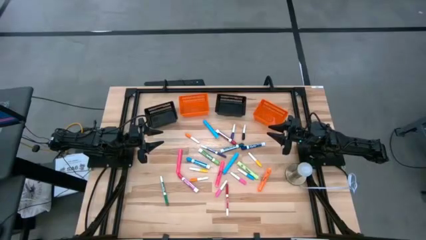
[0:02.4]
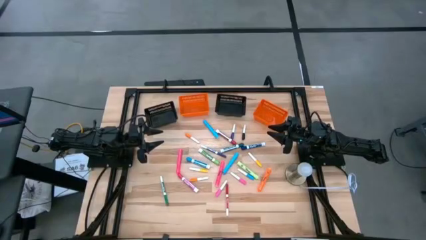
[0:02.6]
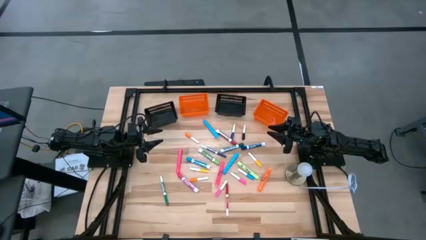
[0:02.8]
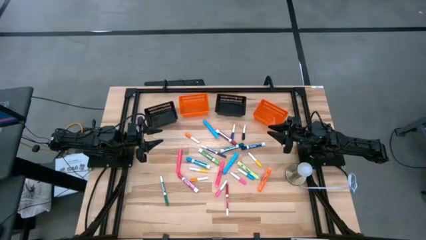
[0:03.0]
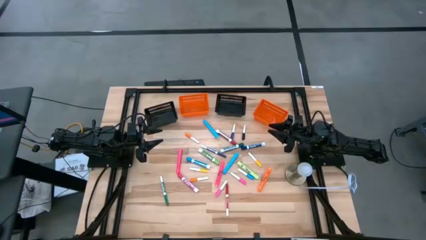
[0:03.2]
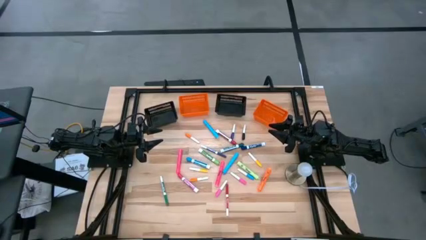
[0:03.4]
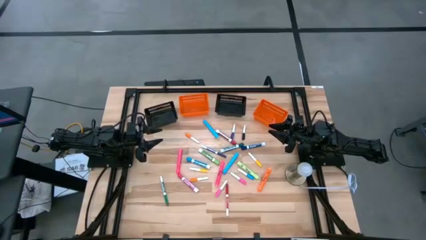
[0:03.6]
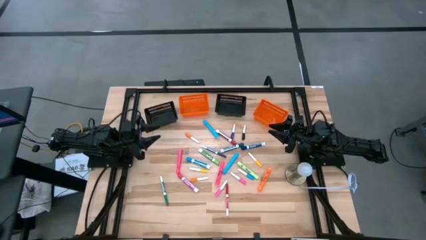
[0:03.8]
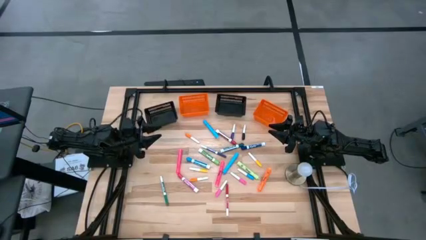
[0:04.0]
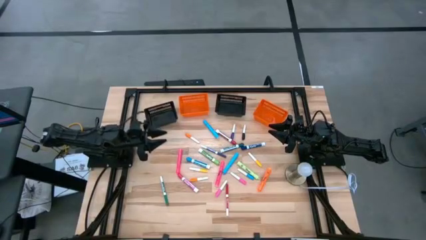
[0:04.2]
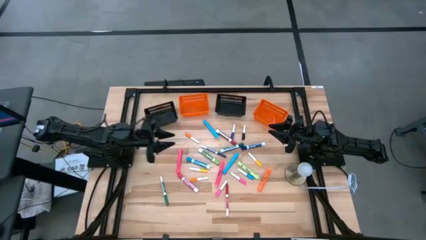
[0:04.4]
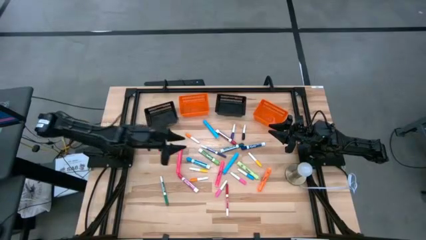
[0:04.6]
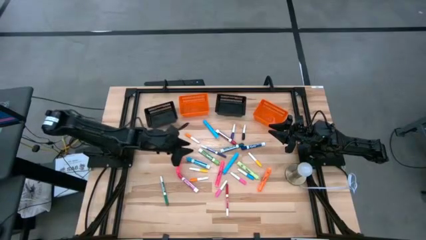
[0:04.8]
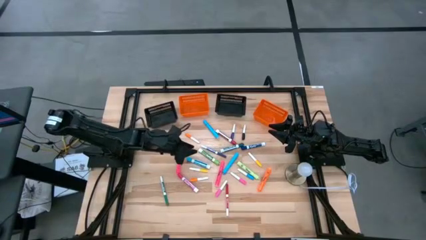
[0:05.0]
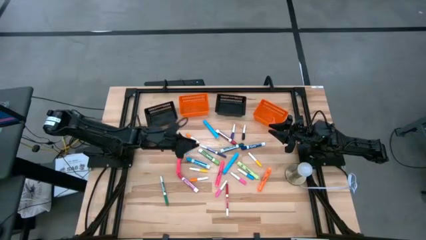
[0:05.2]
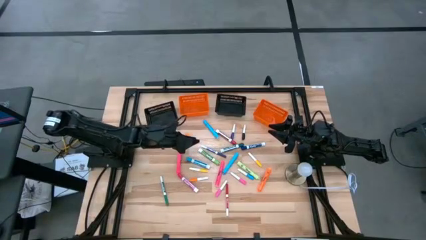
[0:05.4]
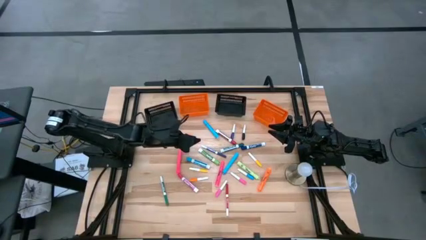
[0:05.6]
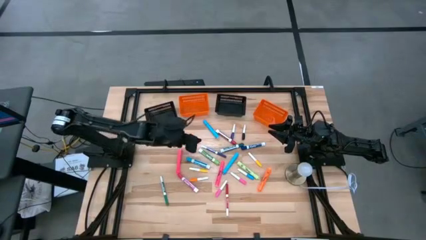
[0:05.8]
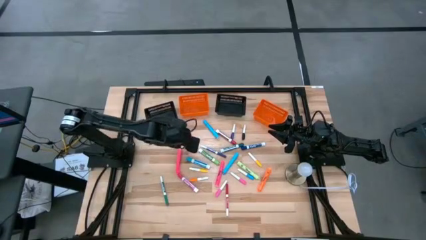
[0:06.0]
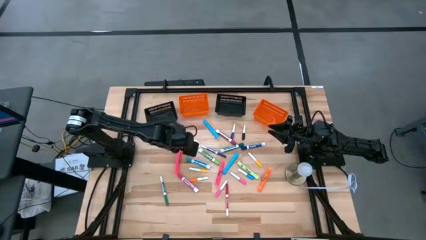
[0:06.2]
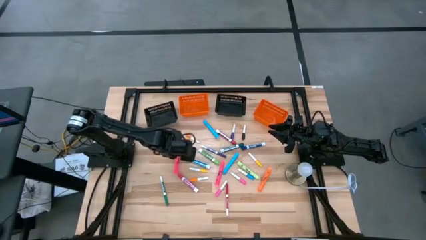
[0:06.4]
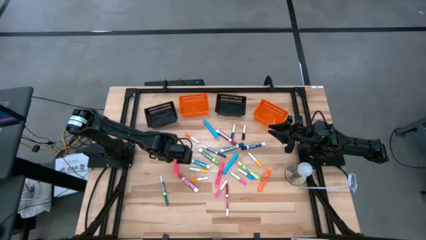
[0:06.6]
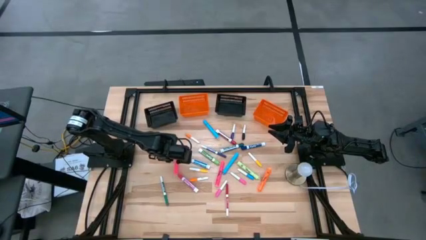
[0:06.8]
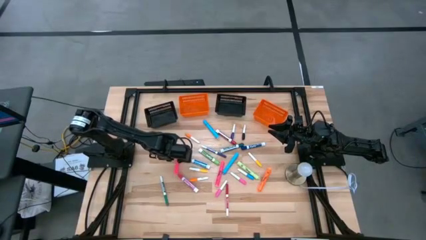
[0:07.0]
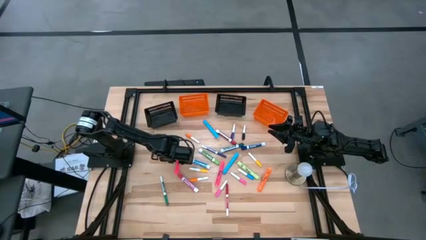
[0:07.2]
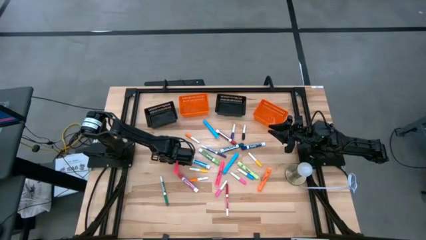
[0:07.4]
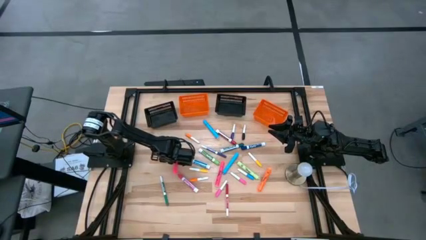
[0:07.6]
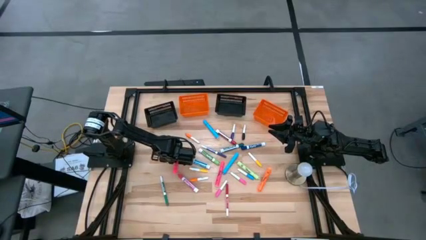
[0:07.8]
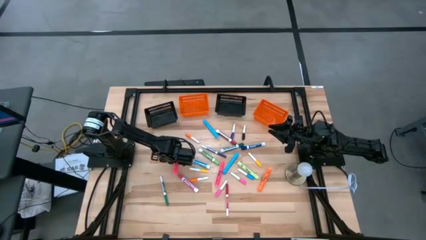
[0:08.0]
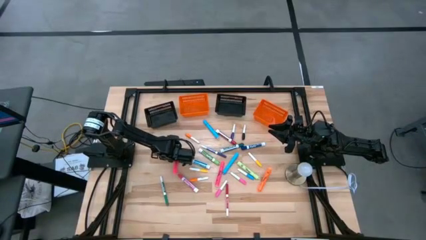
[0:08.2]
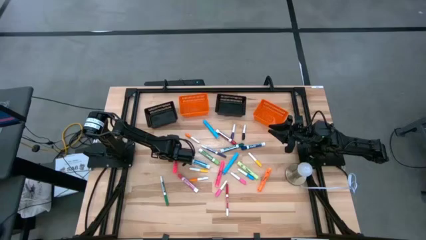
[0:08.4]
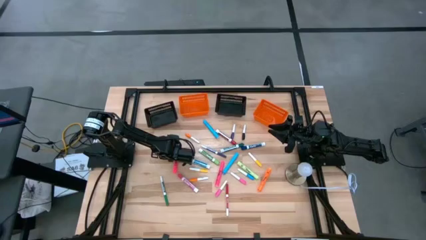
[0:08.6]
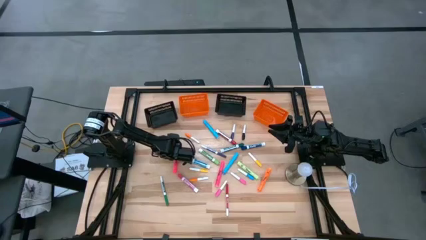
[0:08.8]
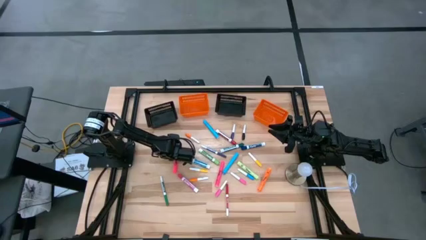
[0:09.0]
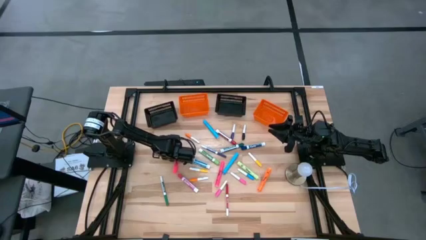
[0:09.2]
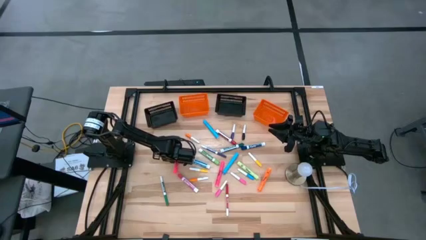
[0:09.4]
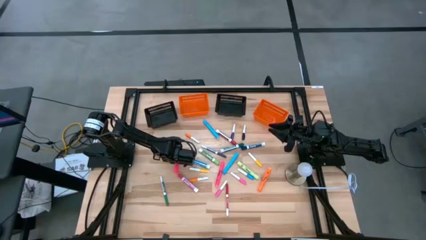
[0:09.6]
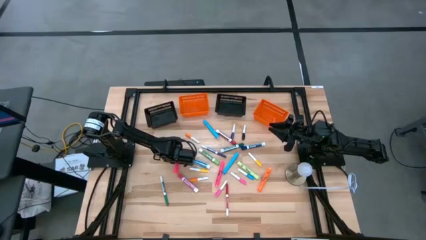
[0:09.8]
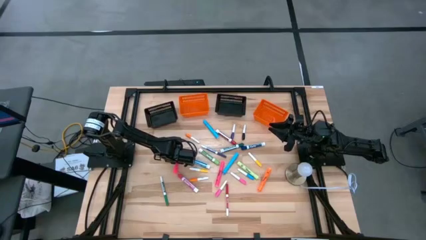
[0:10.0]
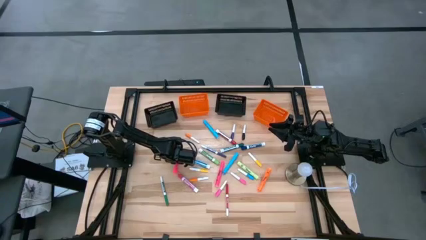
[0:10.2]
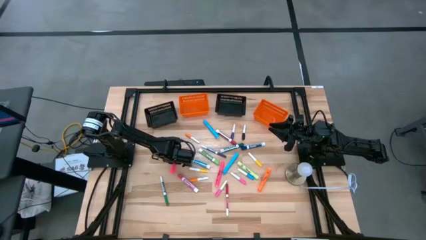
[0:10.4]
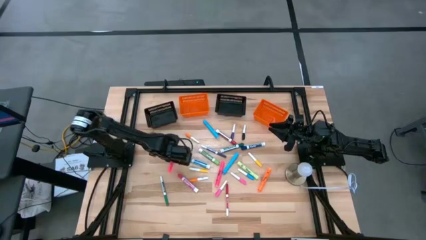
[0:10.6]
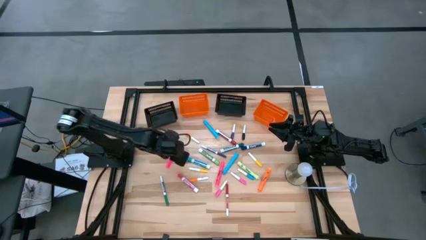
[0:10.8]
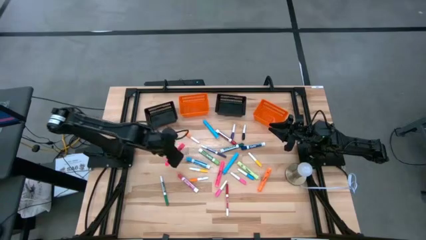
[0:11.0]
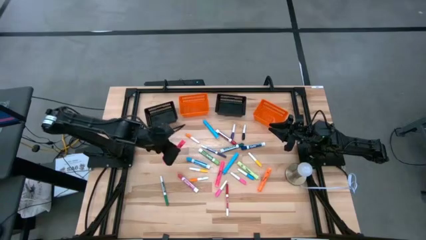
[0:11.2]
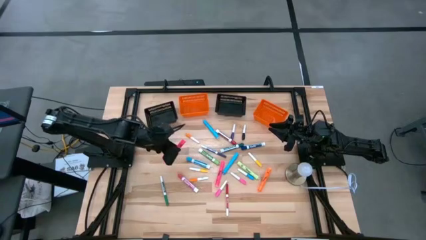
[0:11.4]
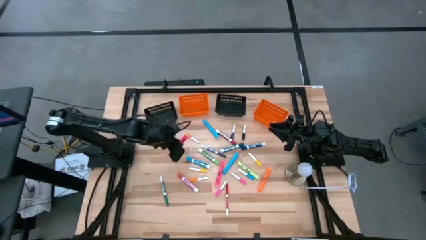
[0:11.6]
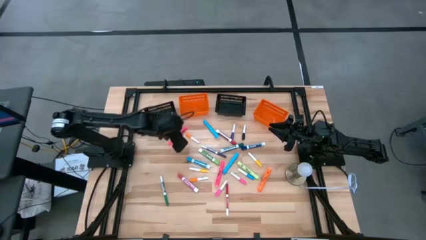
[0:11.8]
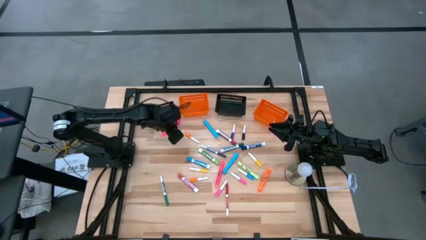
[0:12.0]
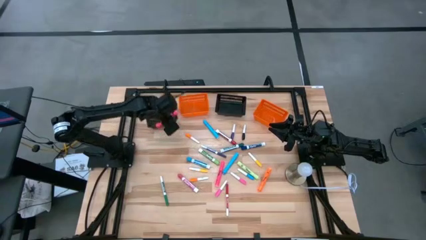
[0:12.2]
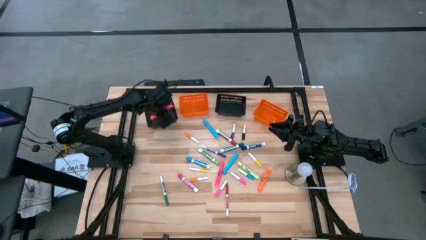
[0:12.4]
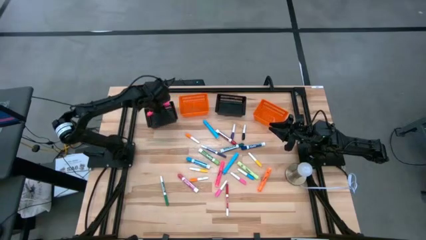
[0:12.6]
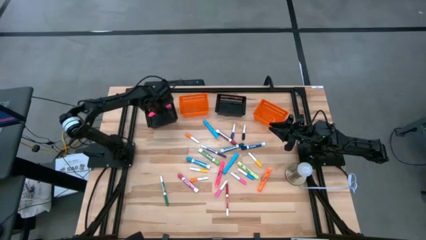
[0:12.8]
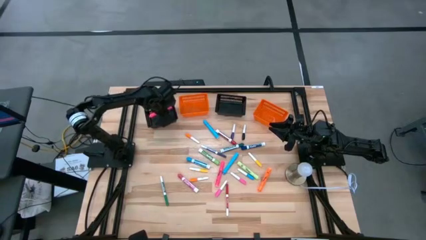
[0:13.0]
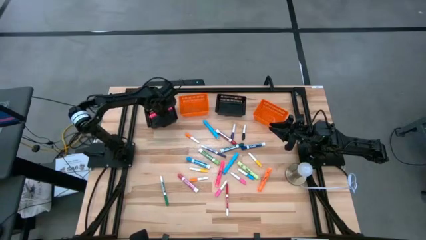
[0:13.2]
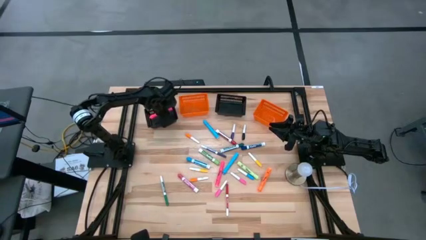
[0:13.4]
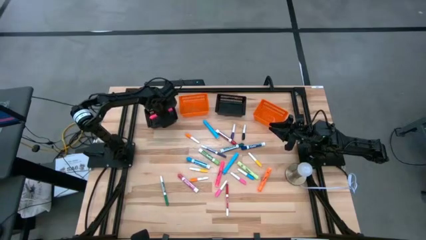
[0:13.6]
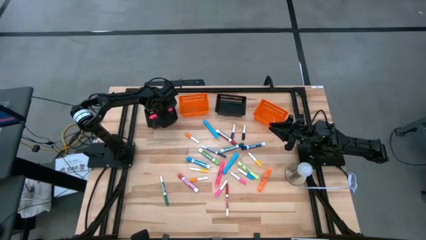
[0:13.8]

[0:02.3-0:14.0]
Task: Pick & Place Markers
Put the left pink highlighter pen into the left black bin
